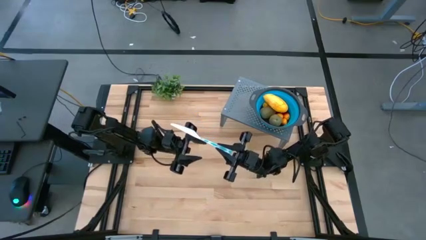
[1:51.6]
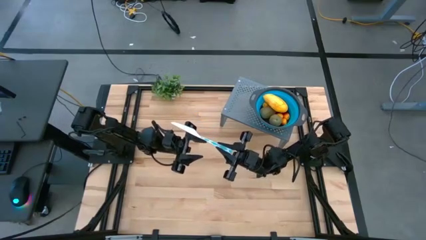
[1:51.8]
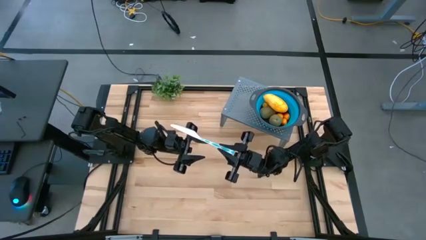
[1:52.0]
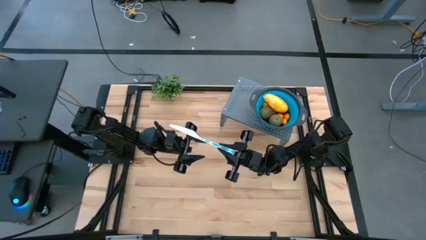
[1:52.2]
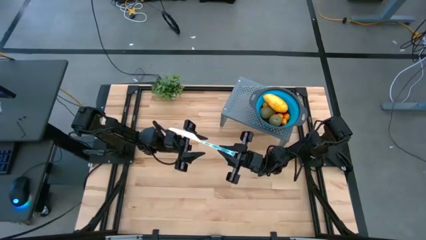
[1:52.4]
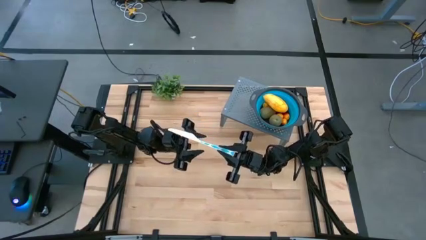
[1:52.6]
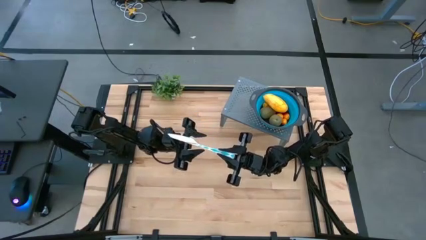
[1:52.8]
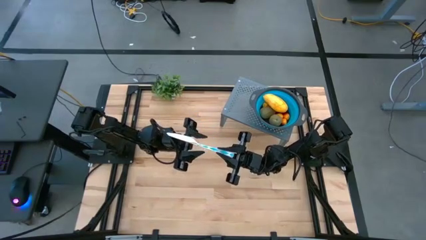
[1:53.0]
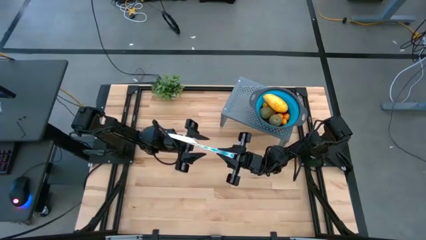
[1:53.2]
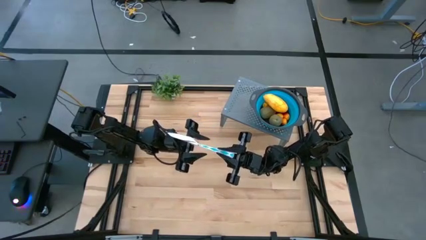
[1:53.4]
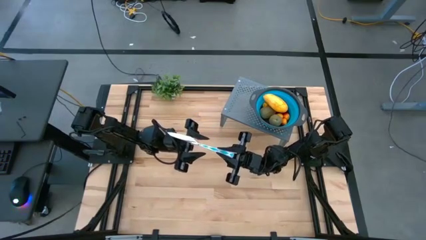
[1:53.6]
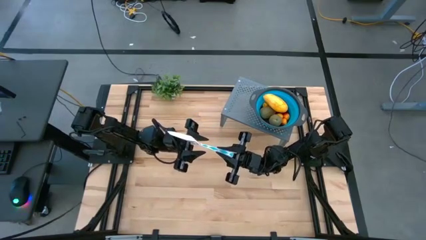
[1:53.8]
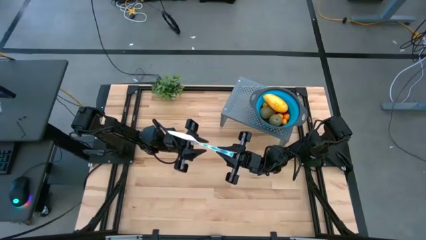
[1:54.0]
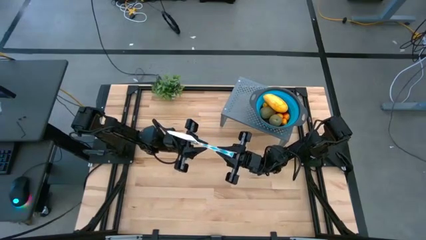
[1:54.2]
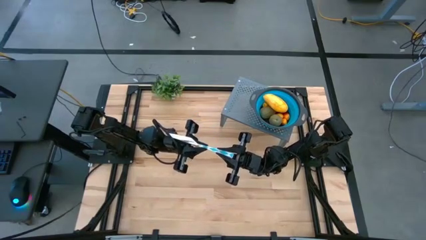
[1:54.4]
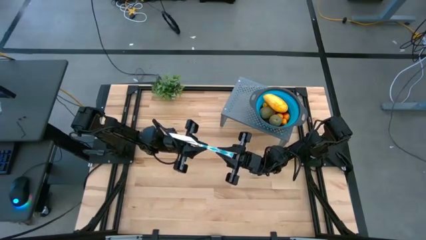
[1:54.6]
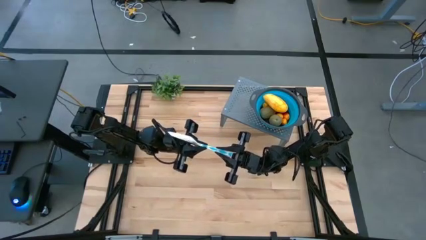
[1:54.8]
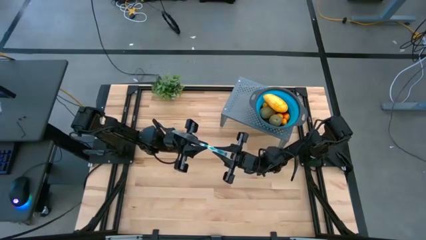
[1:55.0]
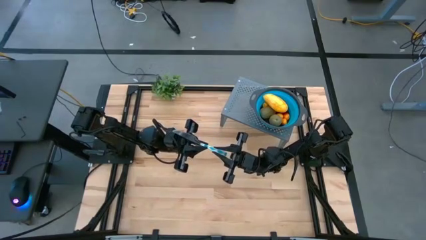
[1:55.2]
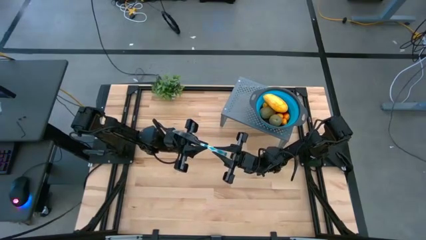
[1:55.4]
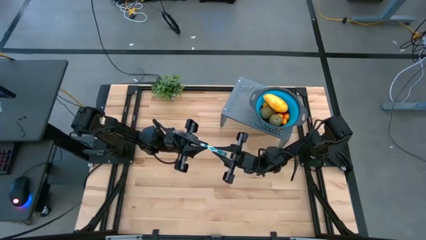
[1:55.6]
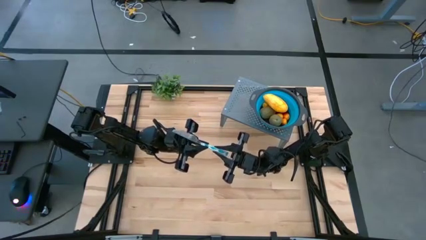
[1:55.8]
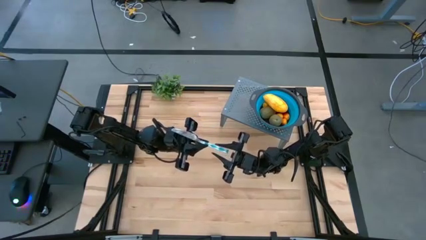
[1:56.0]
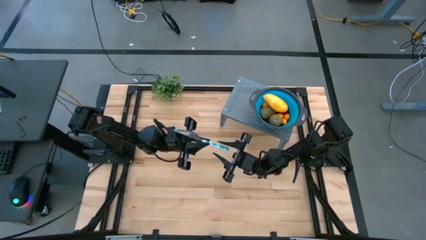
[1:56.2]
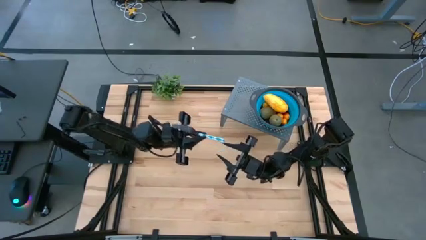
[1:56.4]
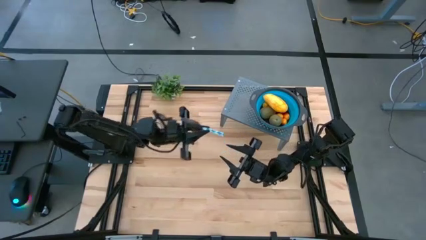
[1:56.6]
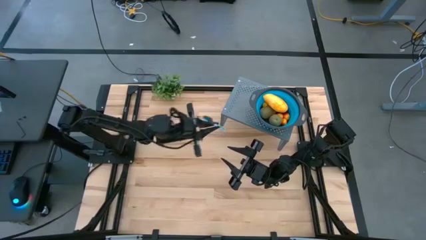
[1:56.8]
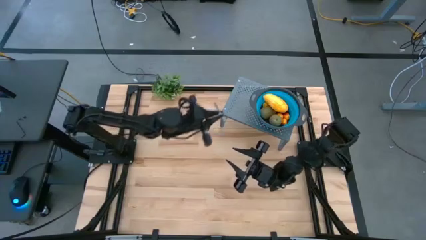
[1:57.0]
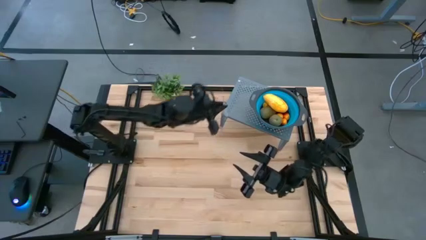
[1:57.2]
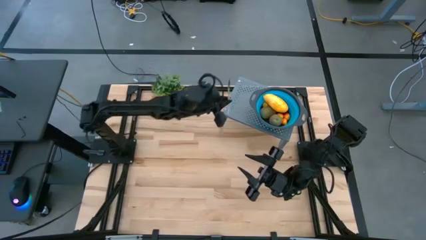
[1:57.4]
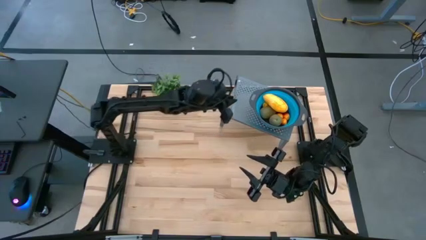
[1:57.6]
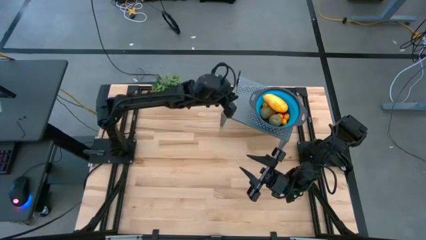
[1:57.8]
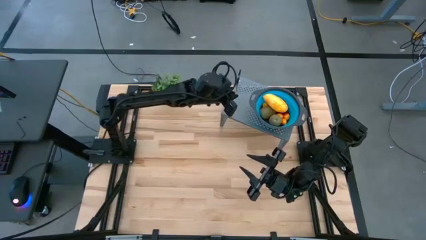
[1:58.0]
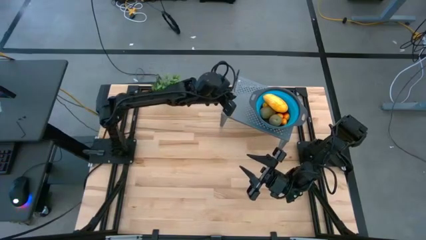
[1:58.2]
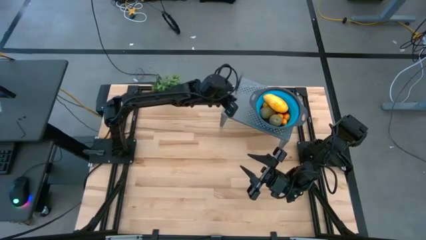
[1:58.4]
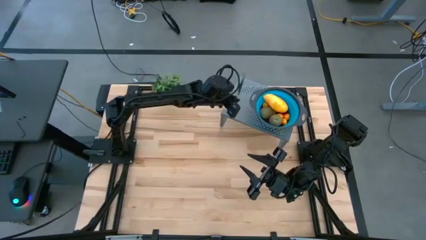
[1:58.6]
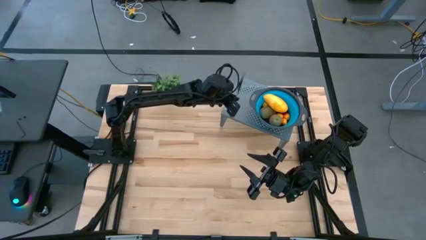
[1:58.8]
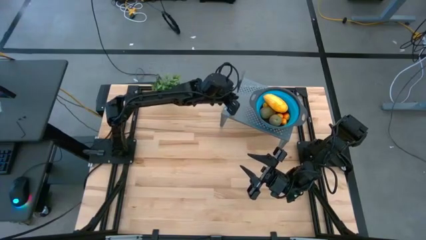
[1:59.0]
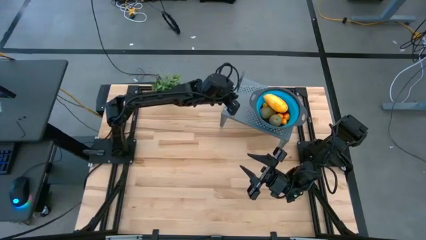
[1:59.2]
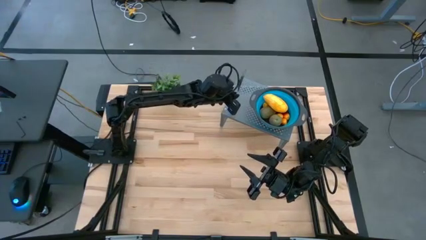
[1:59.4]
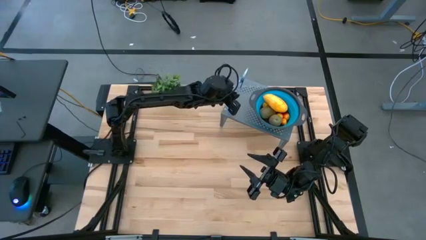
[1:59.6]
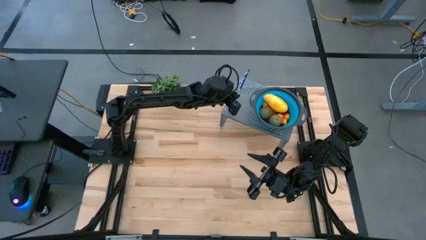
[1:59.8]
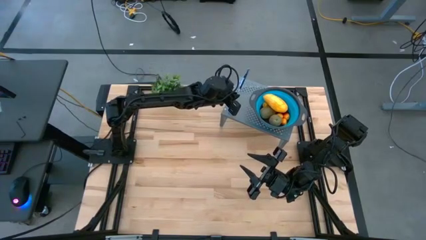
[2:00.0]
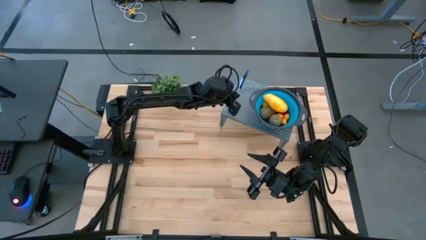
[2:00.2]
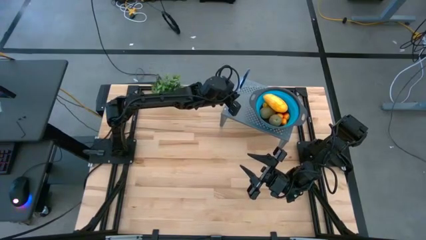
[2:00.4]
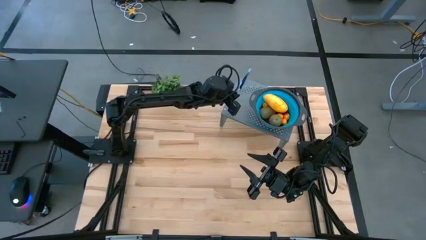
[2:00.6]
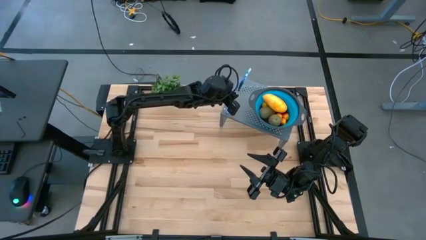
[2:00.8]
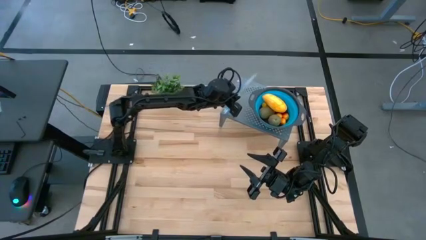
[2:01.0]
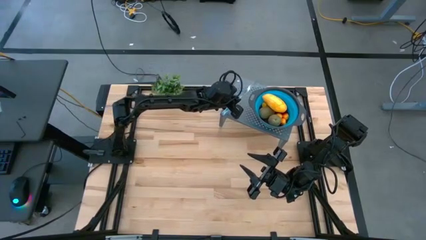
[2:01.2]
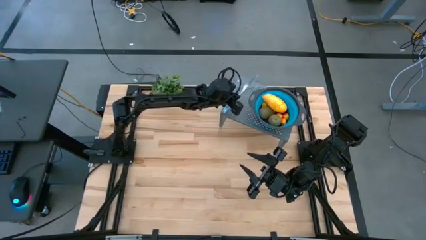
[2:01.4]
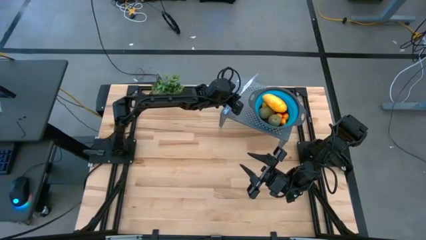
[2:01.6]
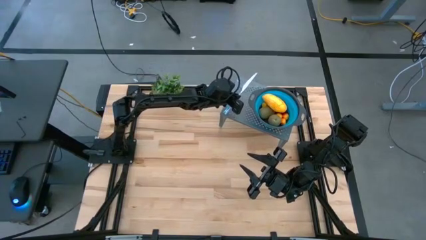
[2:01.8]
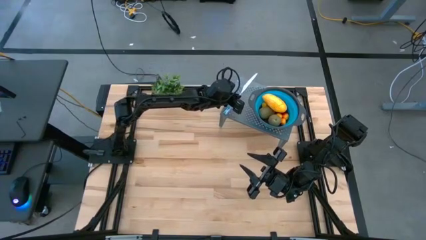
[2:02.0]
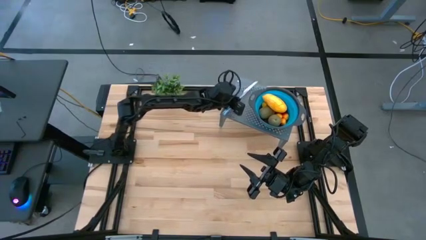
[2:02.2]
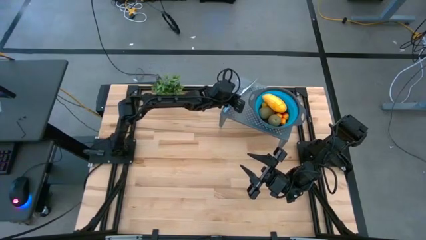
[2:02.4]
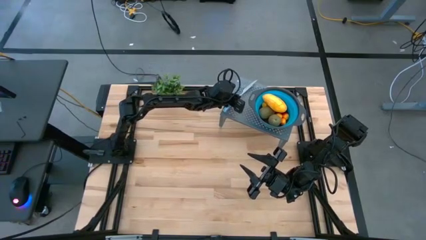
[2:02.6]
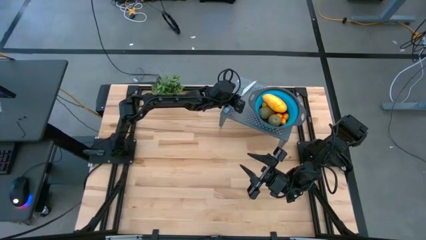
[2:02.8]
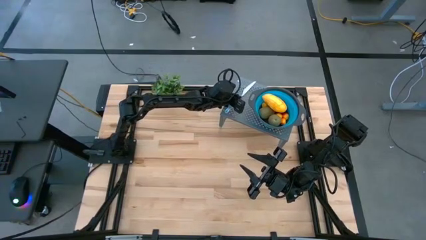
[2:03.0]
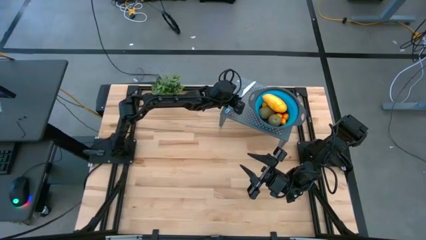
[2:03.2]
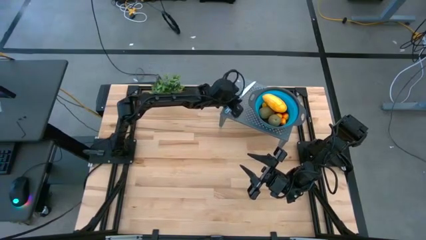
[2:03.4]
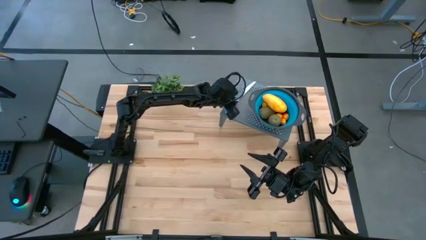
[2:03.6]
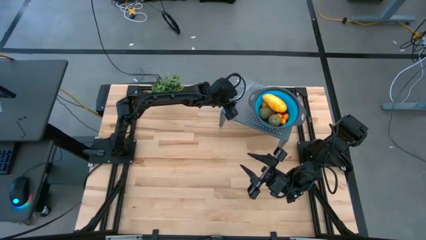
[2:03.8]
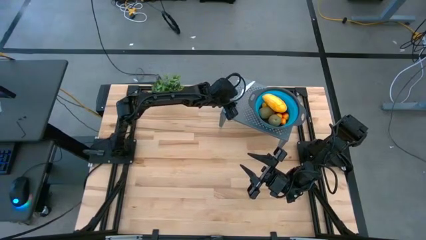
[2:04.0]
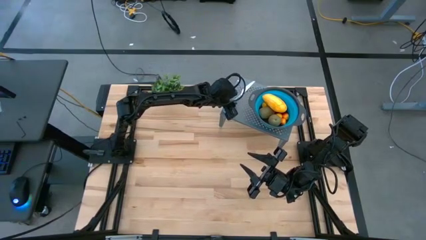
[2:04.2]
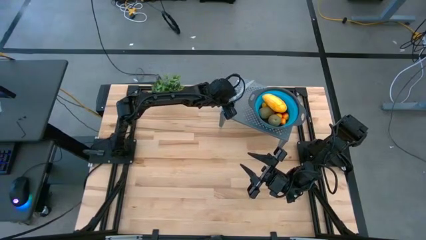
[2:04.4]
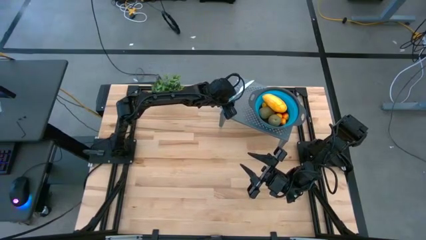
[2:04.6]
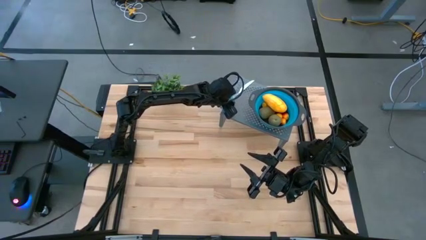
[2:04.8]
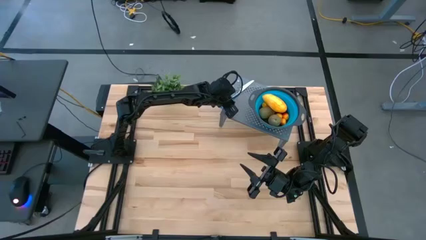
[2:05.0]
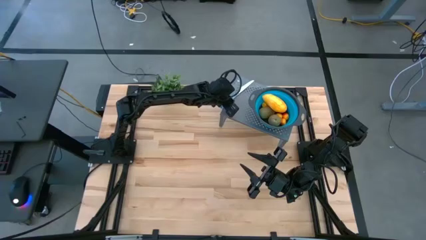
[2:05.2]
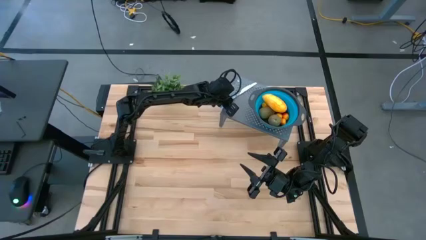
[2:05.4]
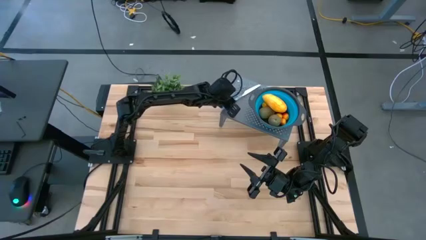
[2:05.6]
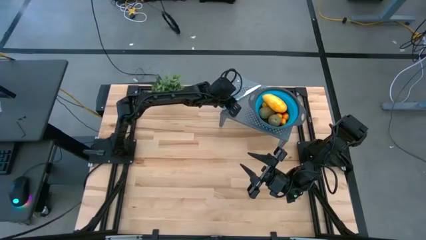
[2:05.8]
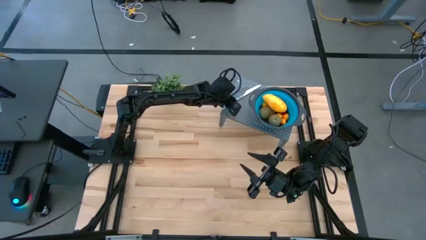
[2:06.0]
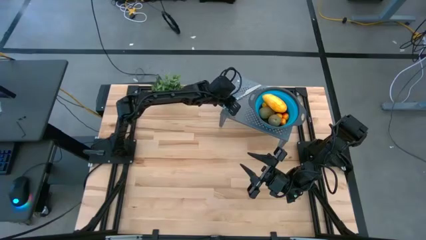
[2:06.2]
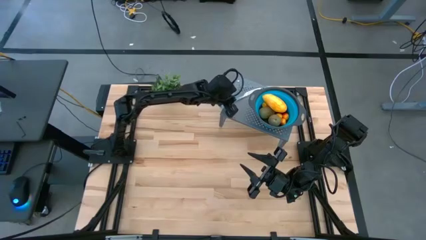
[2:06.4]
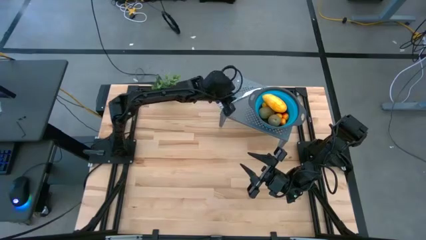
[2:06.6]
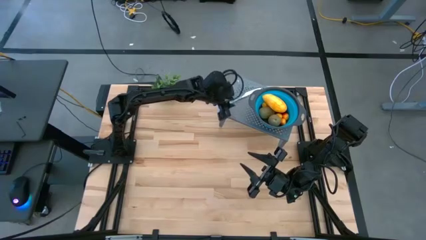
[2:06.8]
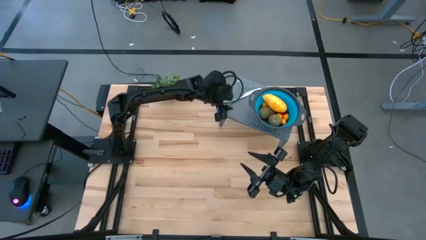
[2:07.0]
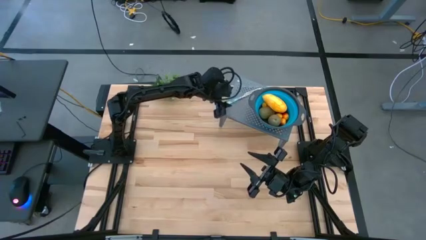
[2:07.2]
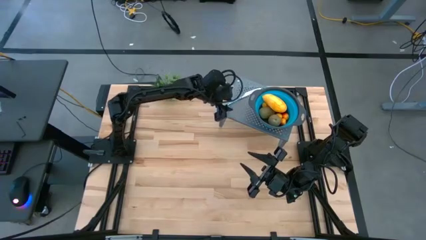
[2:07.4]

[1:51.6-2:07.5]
Task: Pick & Place Fruit
Put the green patterned knife on the shelf

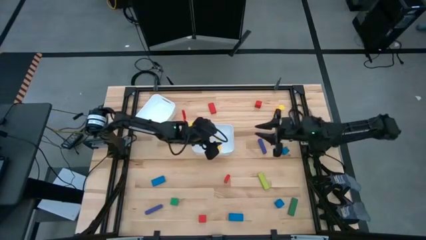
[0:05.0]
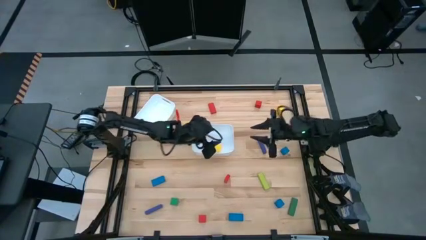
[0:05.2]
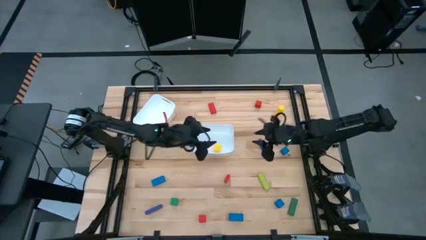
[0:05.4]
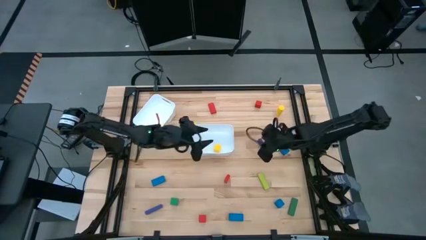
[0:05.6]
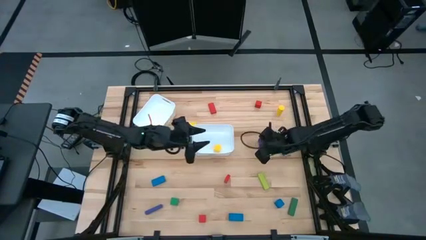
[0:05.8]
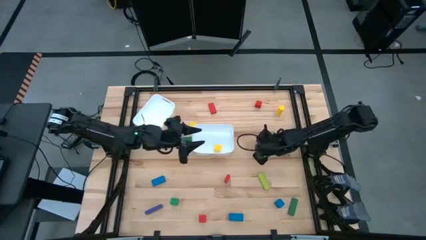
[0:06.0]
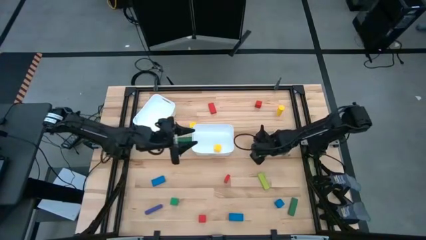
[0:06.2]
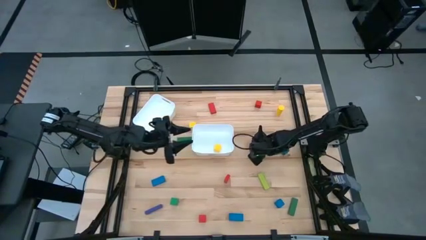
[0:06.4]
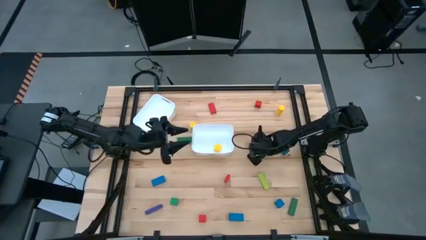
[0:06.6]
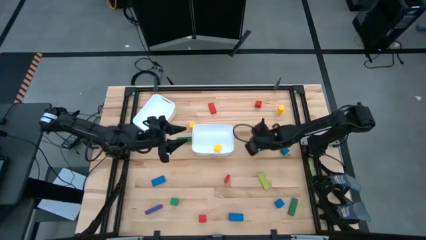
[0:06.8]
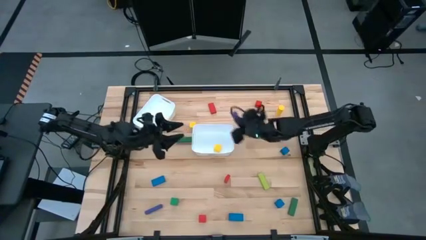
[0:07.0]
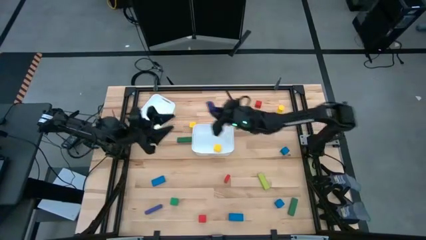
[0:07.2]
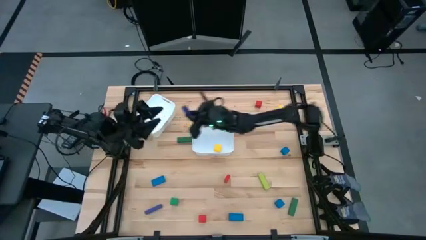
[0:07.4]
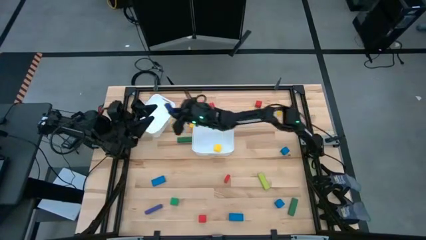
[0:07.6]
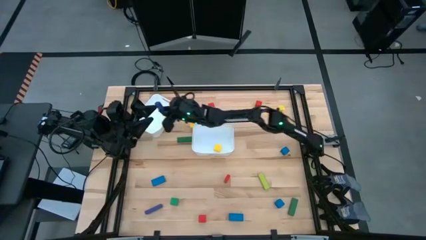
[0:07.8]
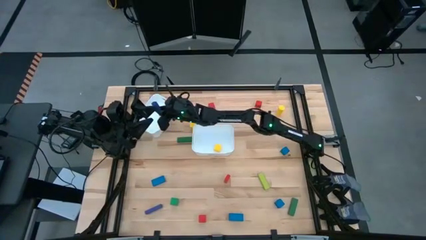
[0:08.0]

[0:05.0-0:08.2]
Task: Sort blocks by size
Put the top violet large block into the top white bin
